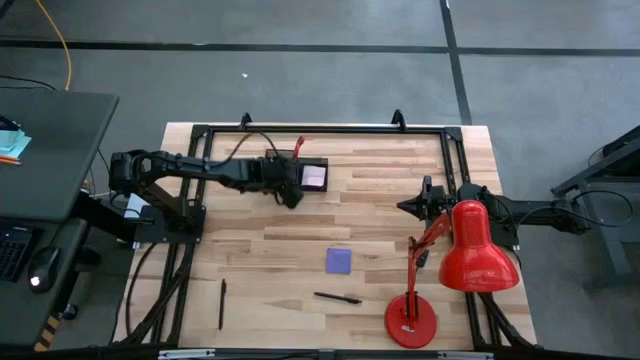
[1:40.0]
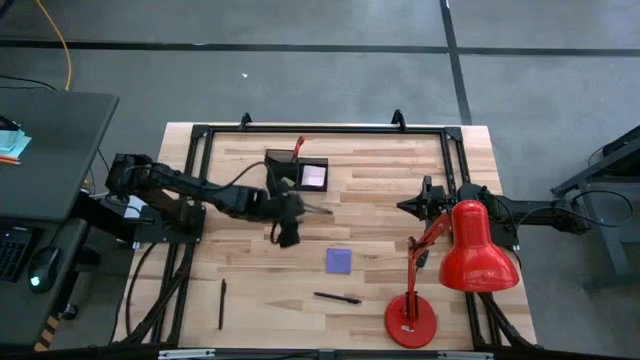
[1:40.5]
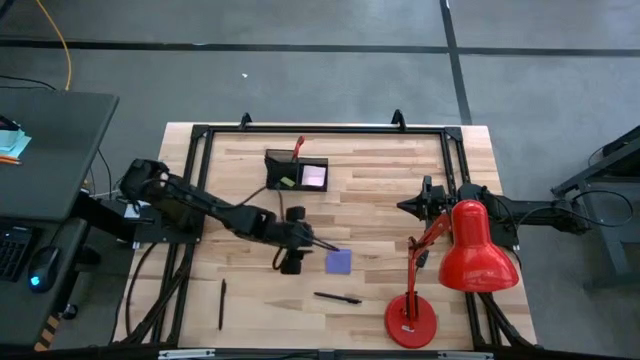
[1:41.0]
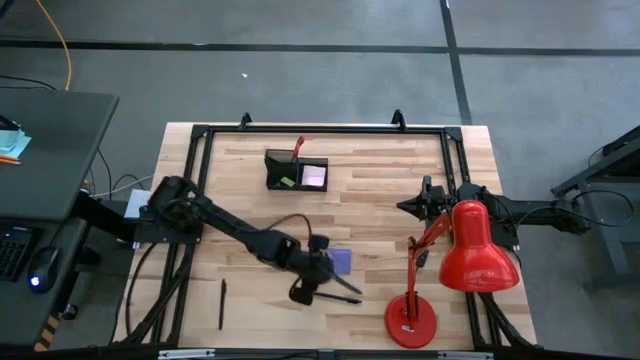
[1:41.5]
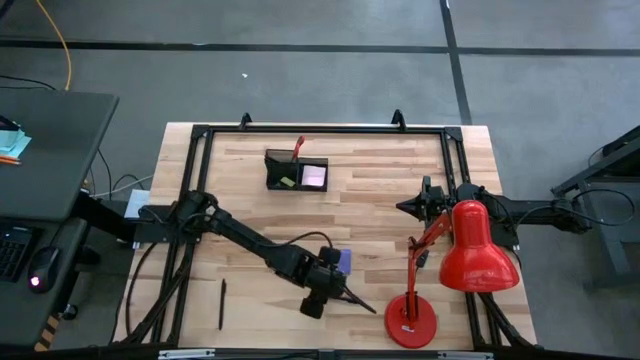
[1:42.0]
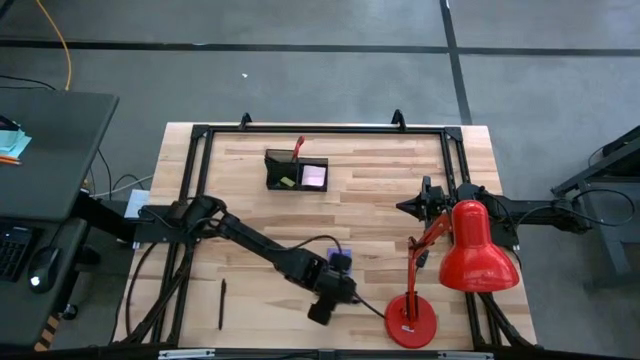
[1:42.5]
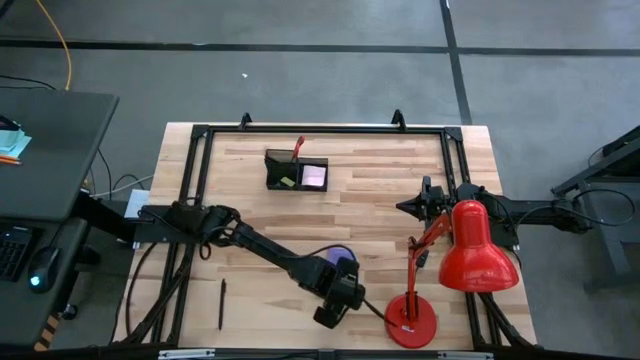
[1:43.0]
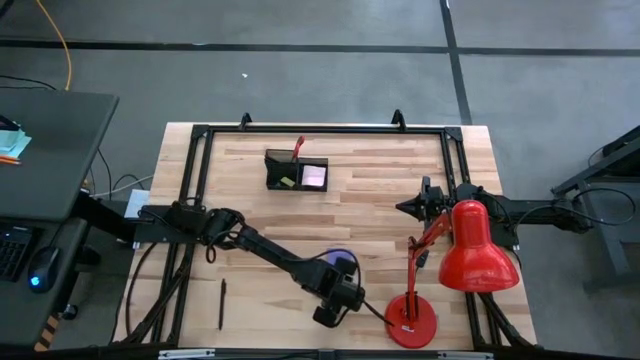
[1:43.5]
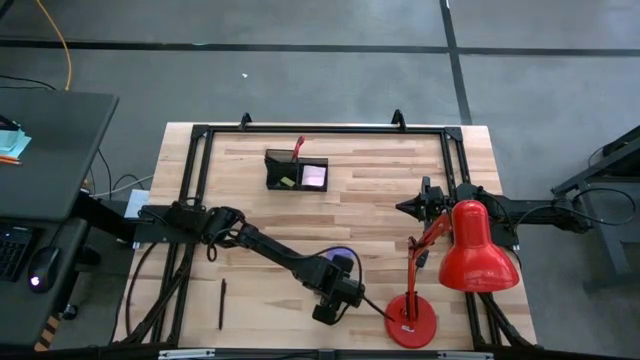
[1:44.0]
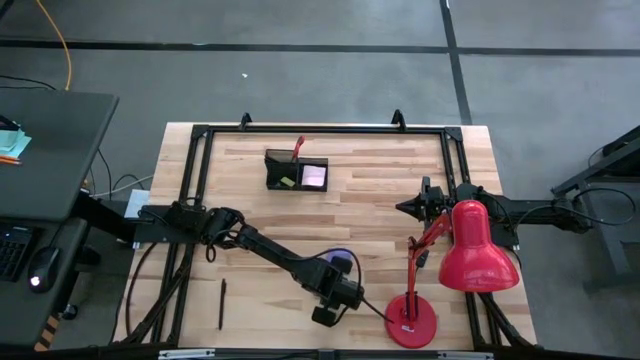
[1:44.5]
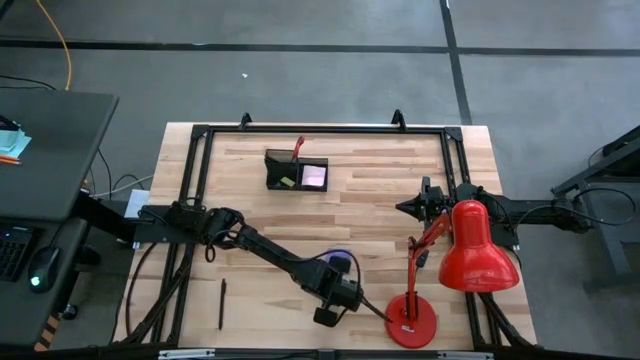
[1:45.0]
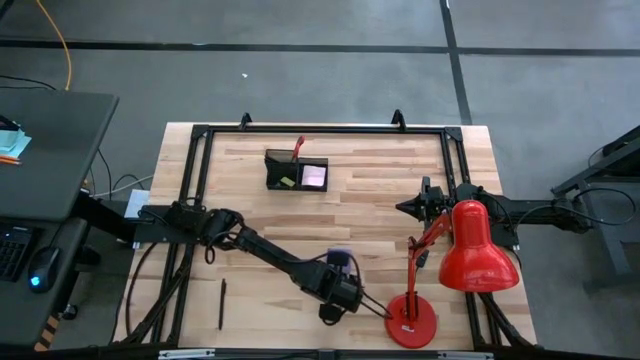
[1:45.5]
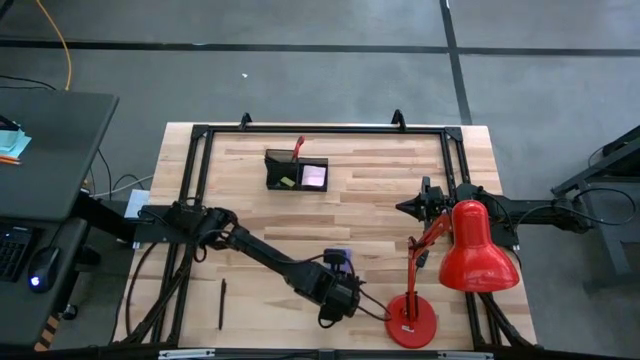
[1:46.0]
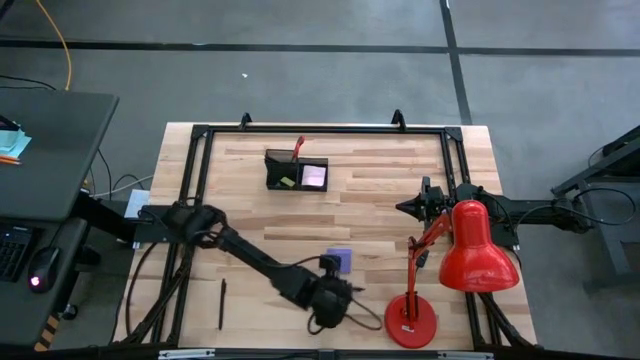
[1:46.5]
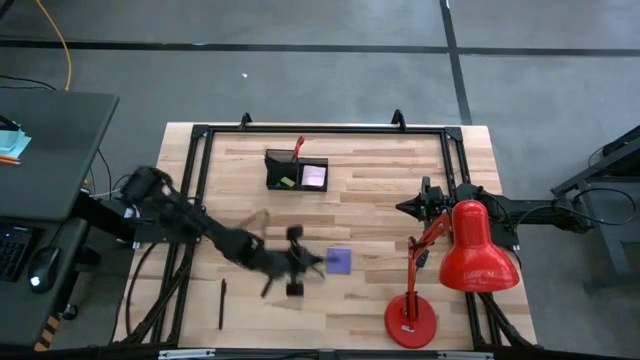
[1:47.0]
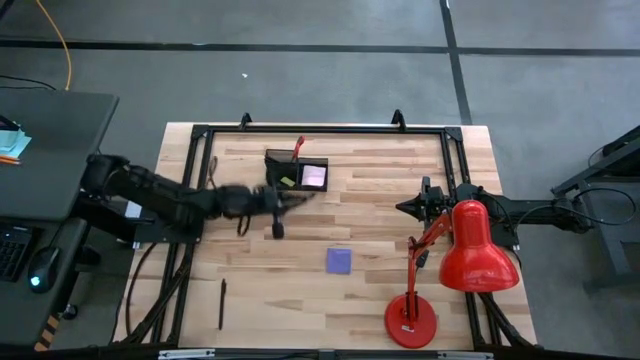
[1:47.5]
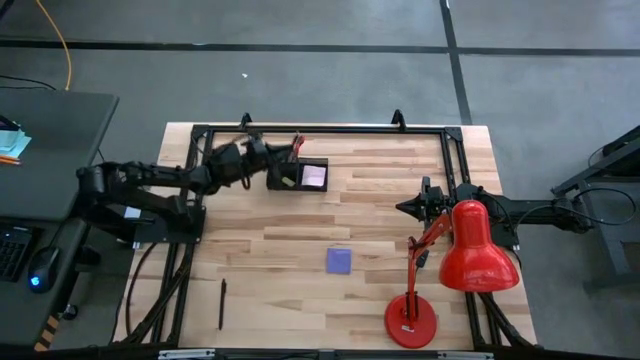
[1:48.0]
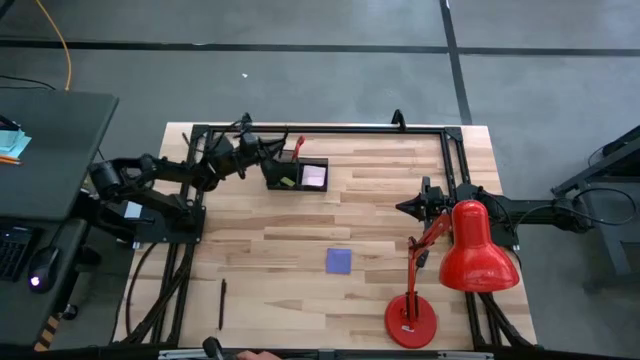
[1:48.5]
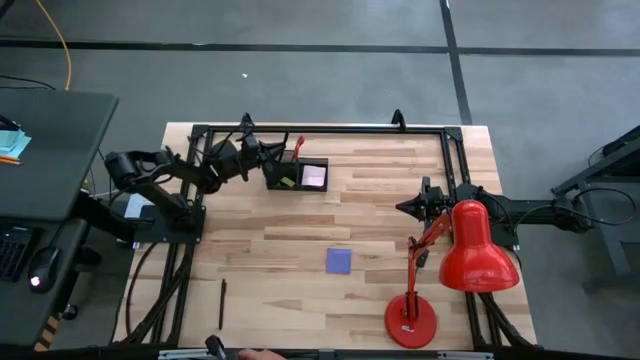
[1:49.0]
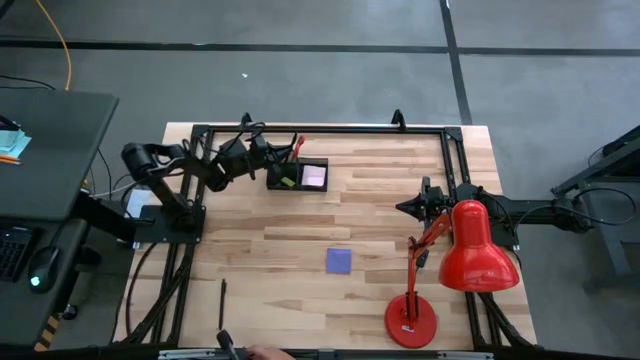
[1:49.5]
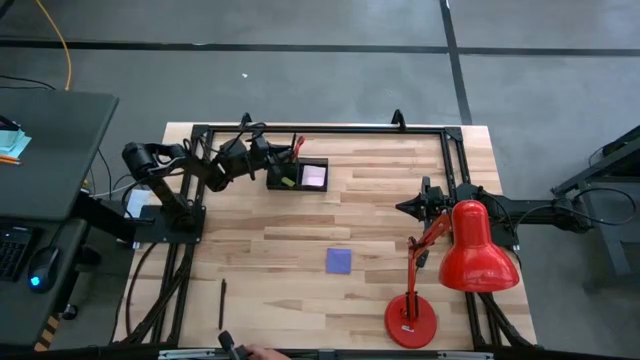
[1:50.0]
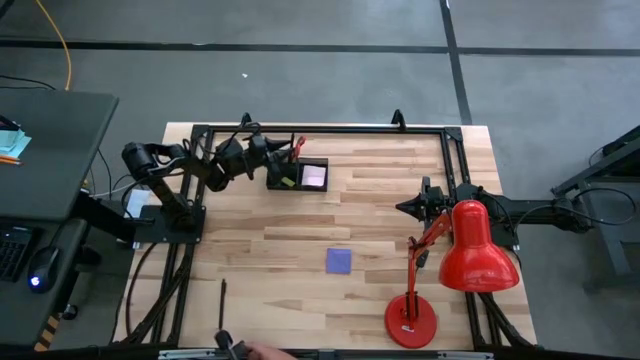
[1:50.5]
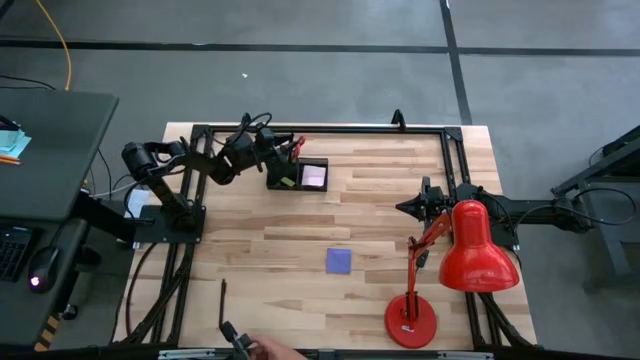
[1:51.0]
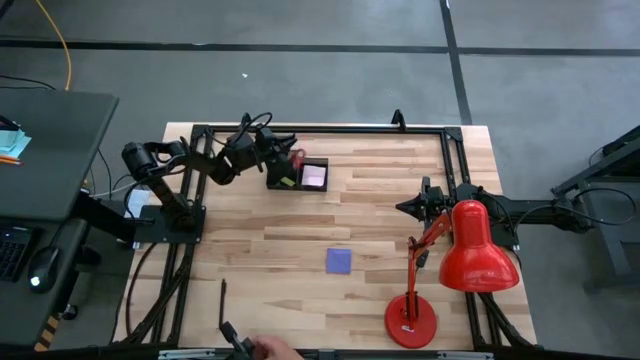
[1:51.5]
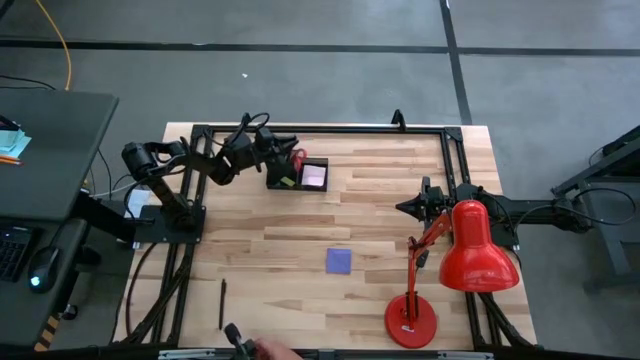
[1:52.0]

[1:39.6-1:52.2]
Task: Pick and place office supplies into organizer
Put the black pen into the black desk organizer

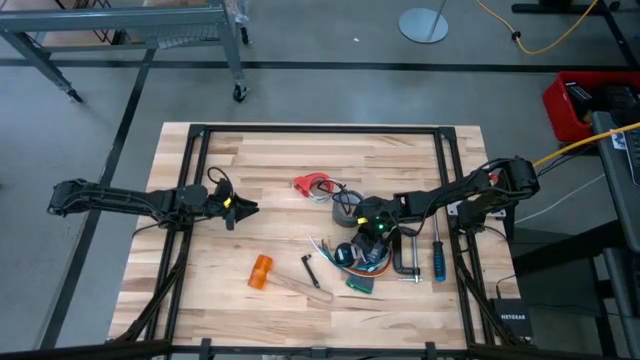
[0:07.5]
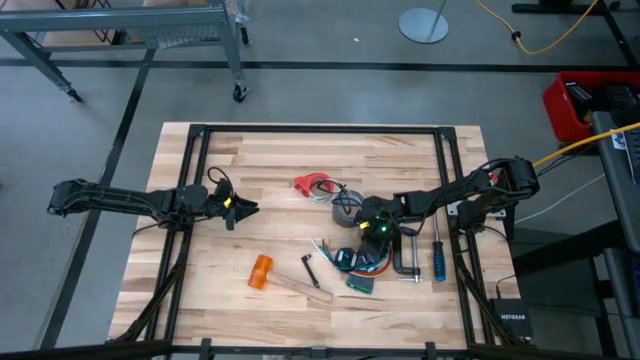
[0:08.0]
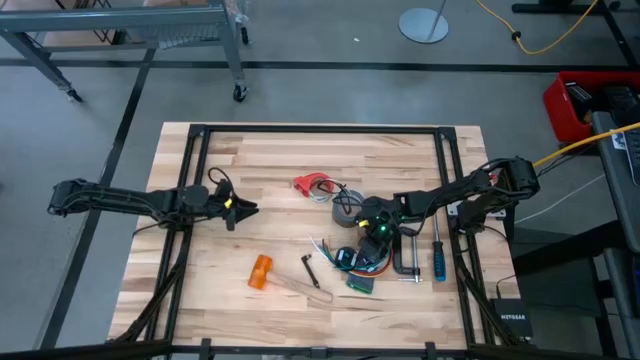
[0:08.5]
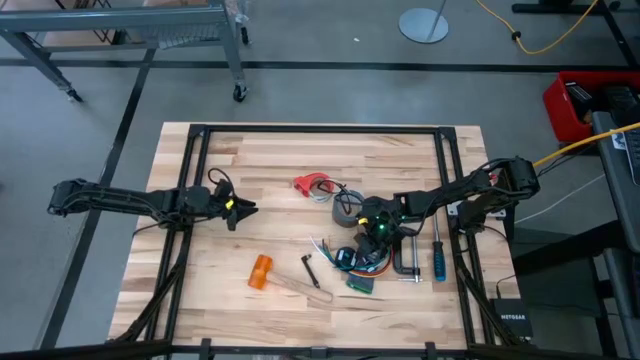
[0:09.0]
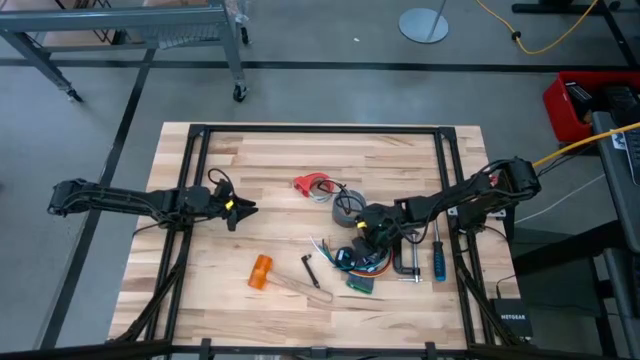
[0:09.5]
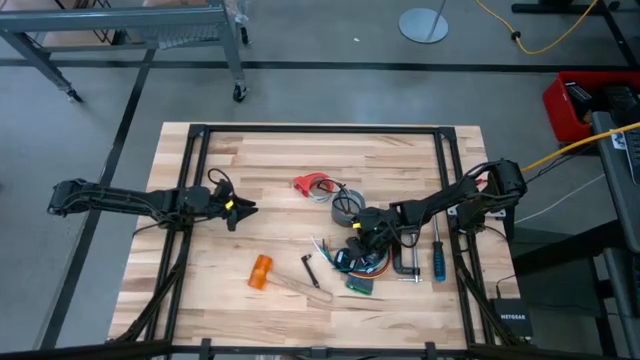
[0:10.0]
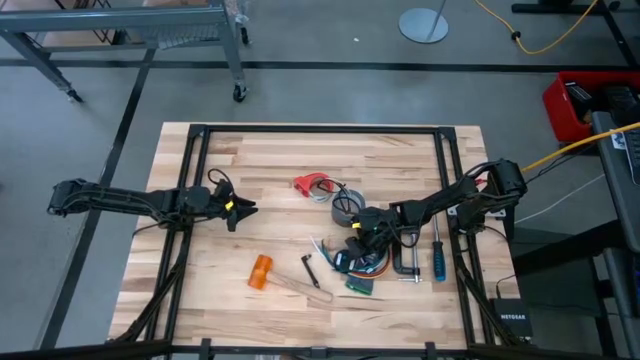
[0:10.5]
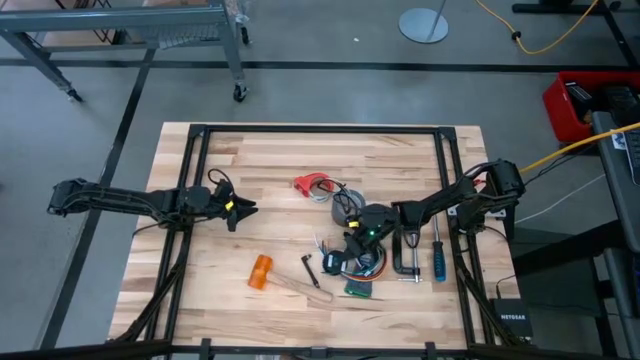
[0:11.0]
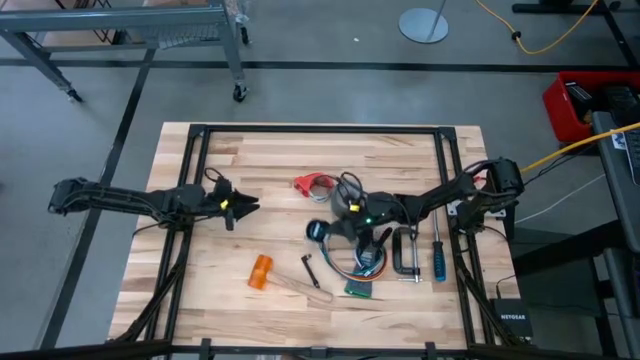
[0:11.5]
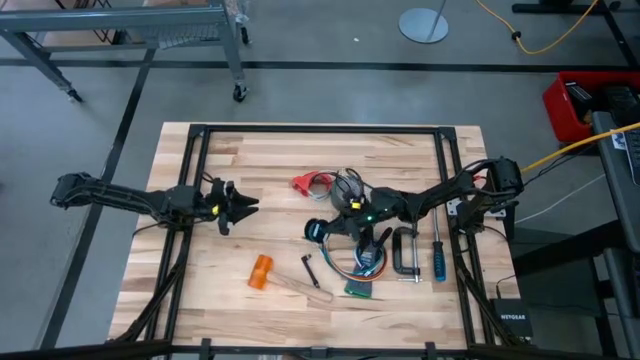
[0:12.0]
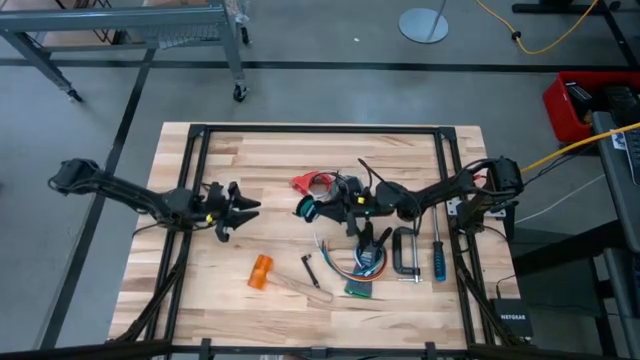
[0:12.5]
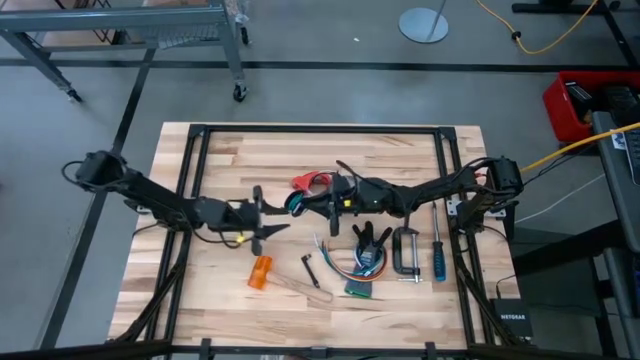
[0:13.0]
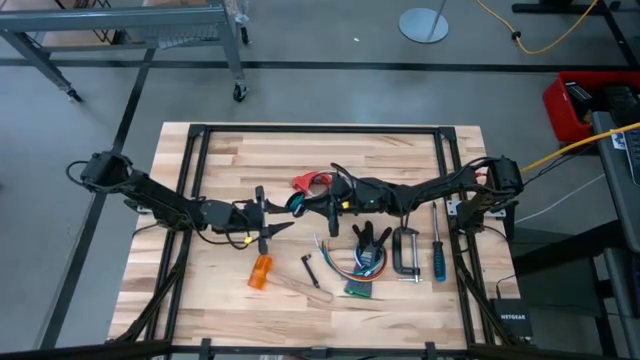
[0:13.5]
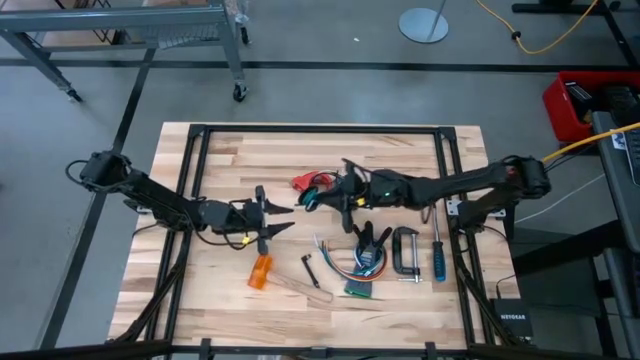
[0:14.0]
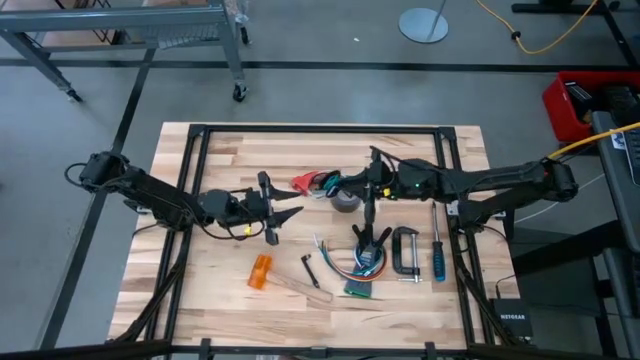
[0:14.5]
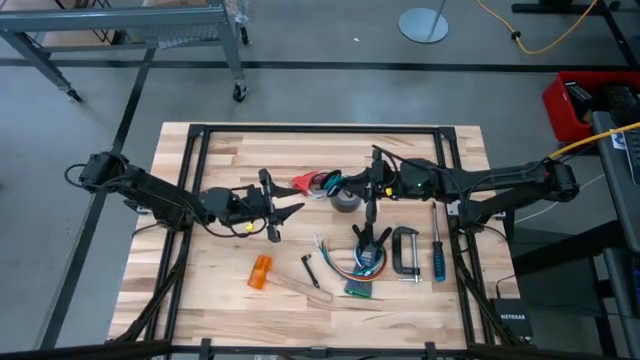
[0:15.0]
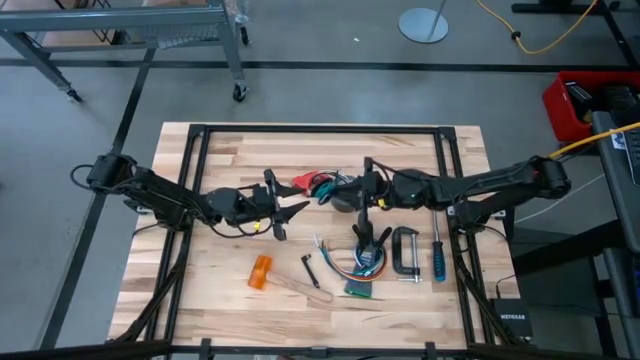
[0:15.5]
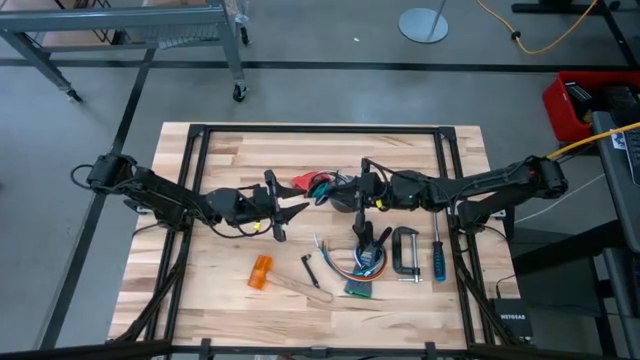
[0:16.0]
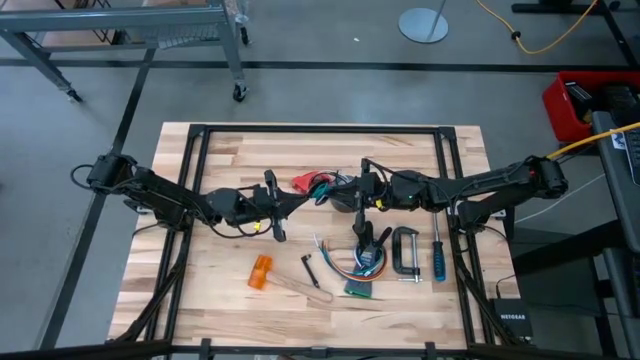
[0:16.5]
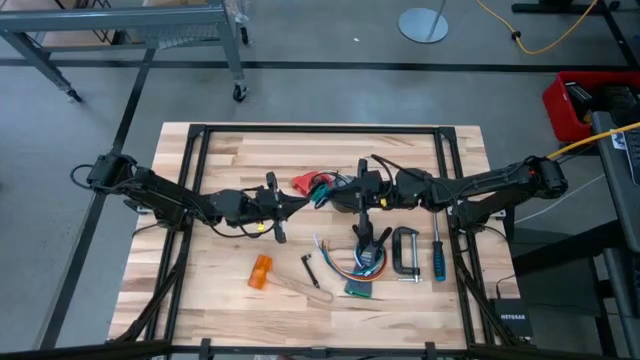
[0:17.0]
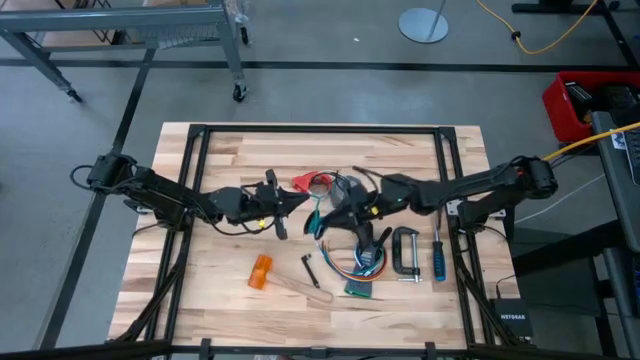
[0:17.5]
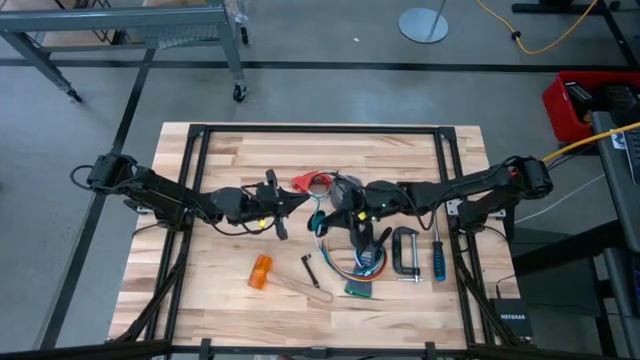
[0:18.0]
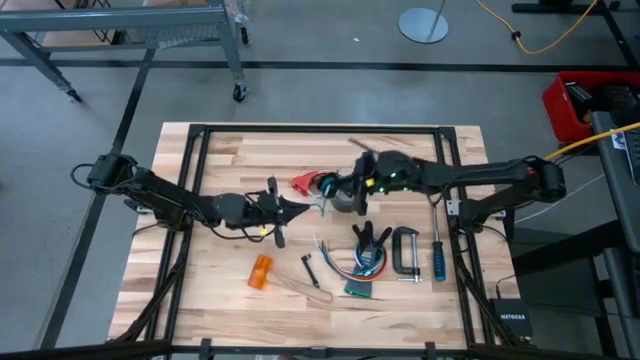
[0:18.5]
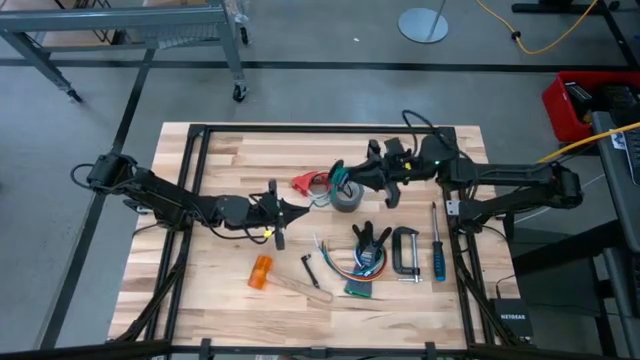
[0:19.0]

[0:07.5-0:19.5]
Task: Coil cords
Uncoil the blue wire from the spool
